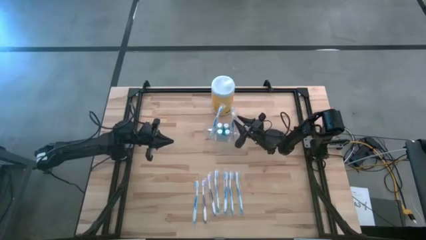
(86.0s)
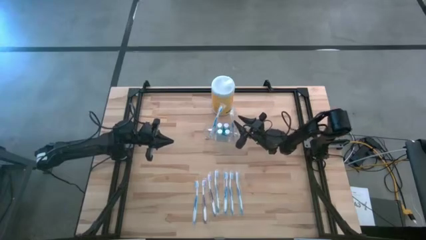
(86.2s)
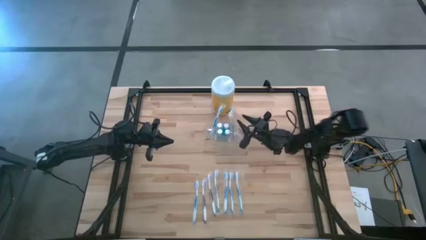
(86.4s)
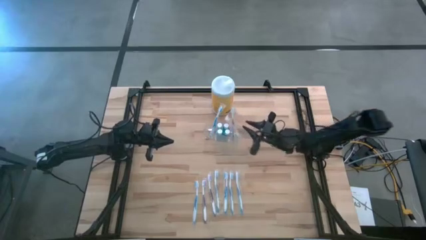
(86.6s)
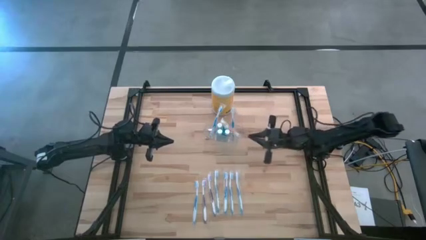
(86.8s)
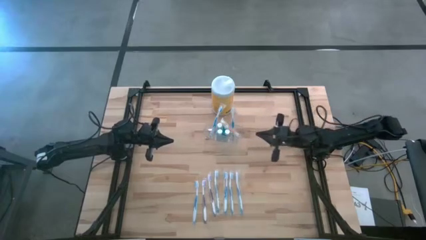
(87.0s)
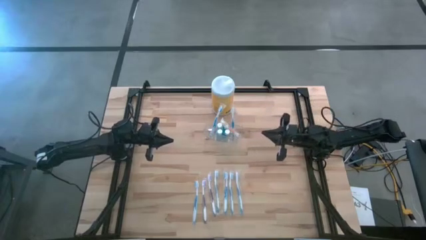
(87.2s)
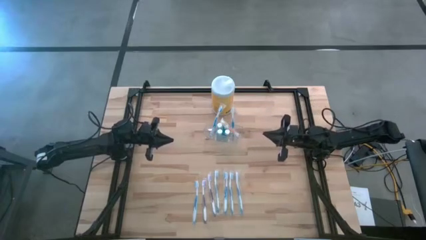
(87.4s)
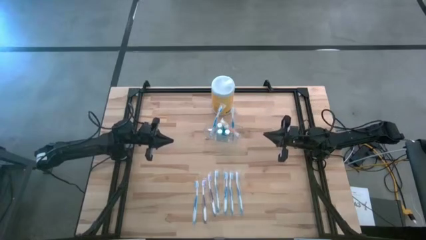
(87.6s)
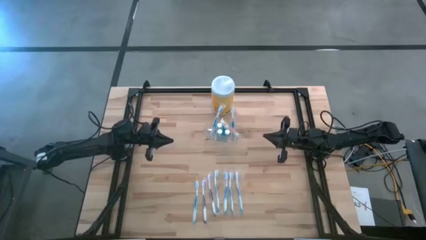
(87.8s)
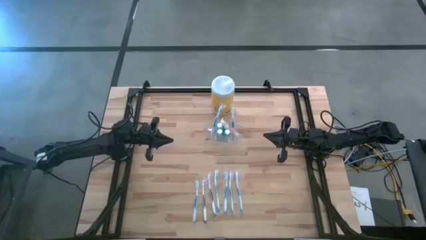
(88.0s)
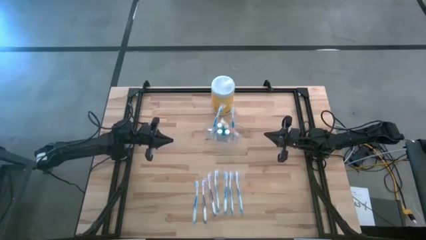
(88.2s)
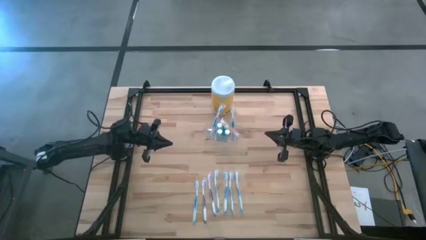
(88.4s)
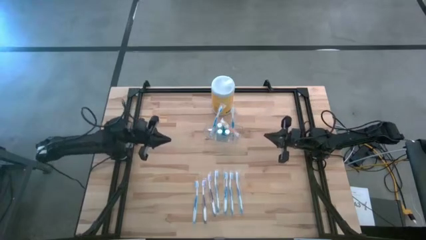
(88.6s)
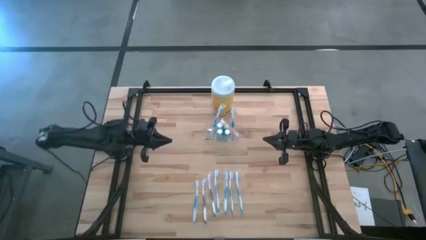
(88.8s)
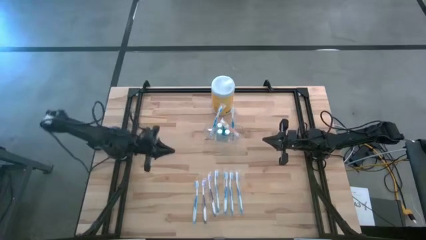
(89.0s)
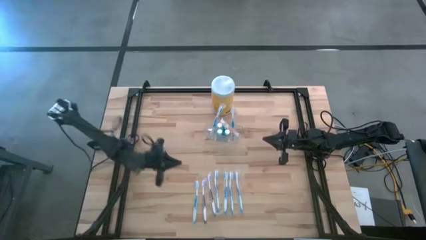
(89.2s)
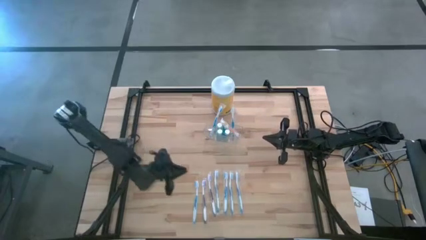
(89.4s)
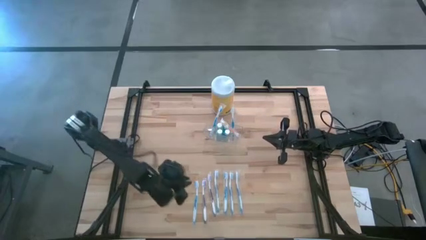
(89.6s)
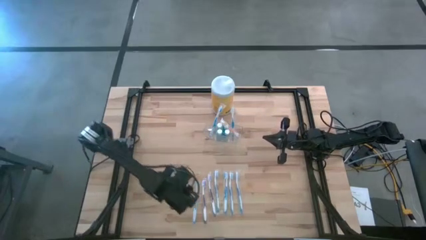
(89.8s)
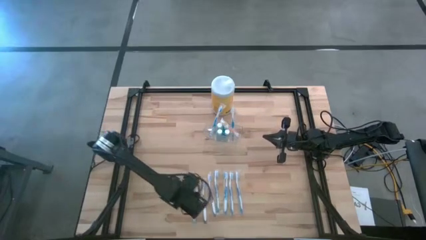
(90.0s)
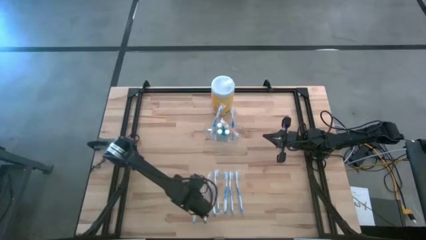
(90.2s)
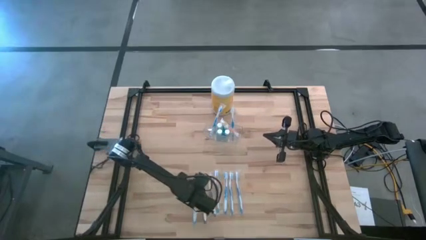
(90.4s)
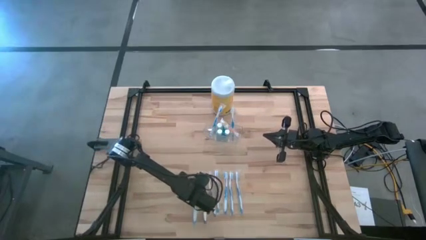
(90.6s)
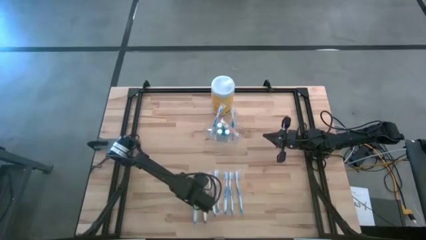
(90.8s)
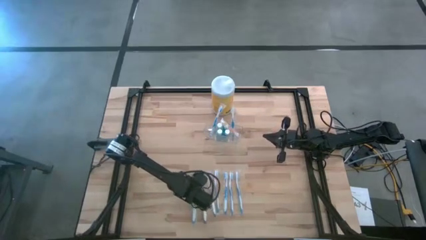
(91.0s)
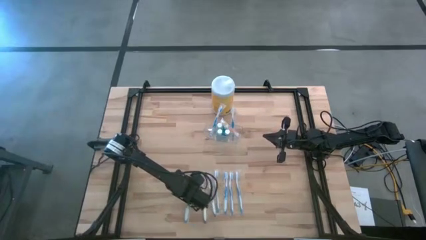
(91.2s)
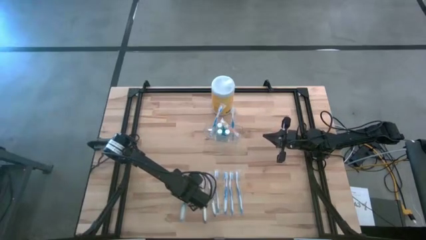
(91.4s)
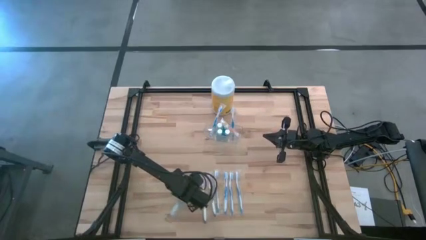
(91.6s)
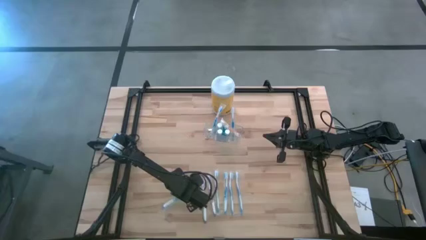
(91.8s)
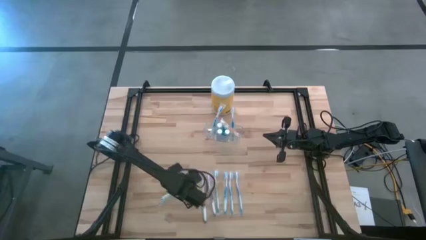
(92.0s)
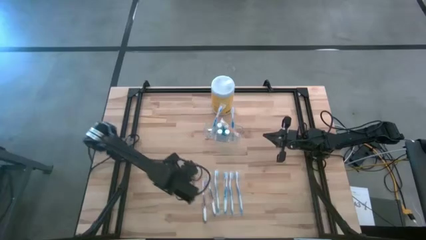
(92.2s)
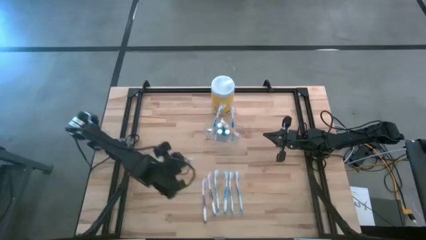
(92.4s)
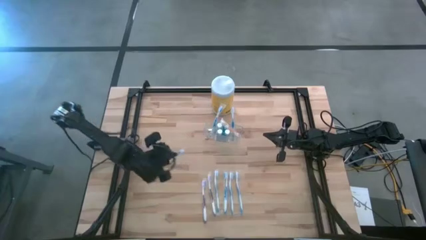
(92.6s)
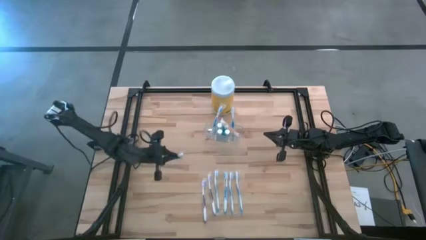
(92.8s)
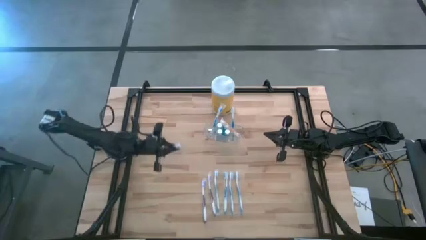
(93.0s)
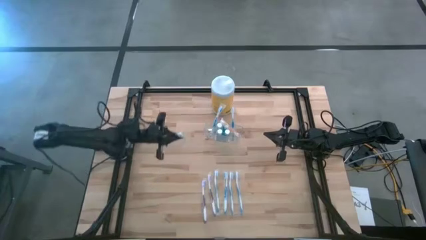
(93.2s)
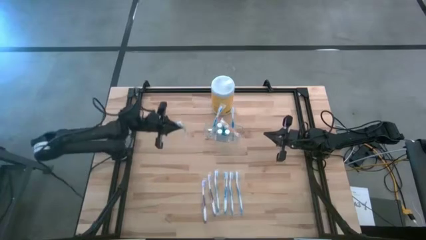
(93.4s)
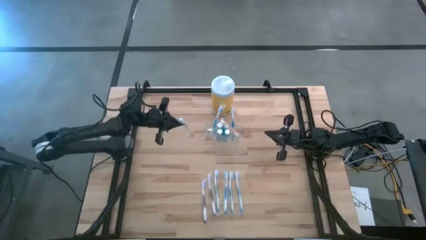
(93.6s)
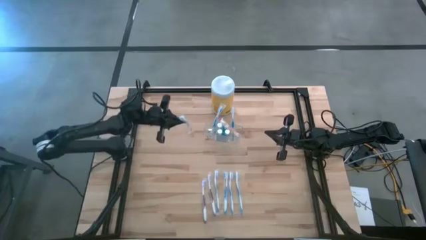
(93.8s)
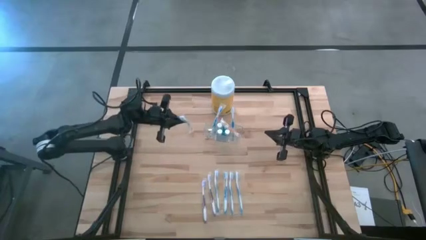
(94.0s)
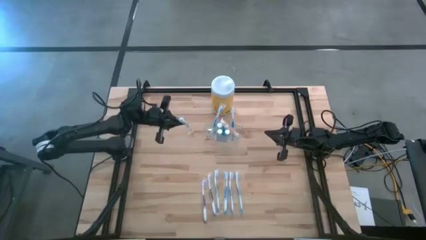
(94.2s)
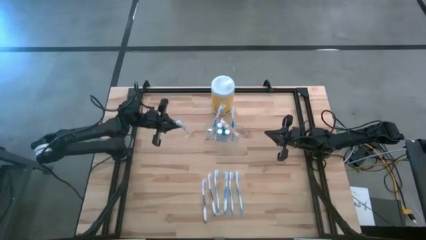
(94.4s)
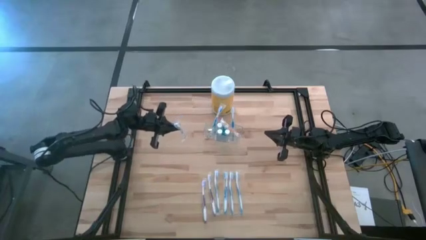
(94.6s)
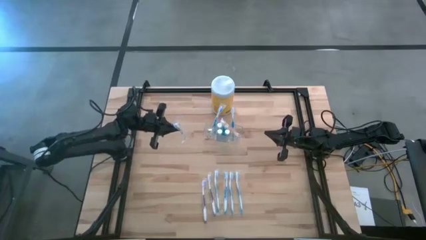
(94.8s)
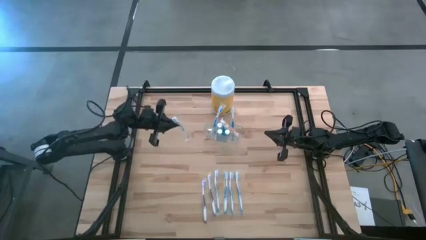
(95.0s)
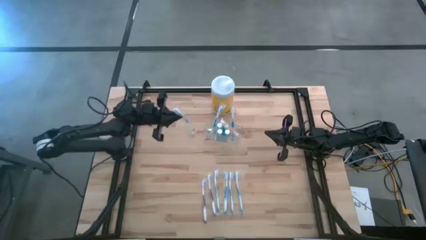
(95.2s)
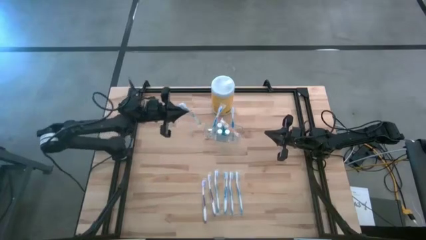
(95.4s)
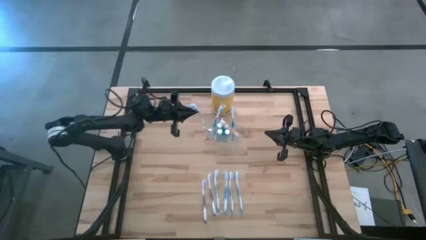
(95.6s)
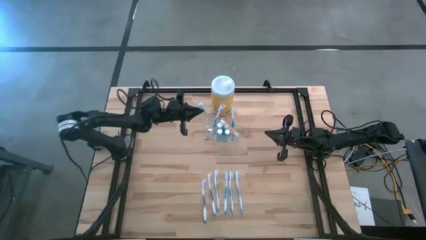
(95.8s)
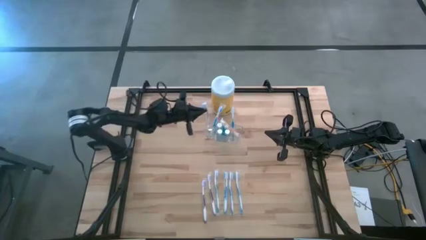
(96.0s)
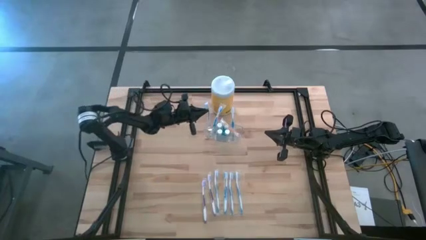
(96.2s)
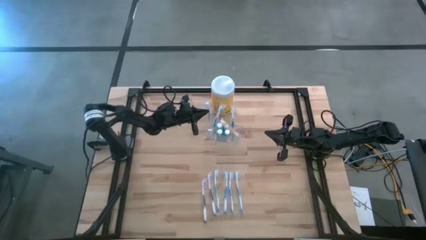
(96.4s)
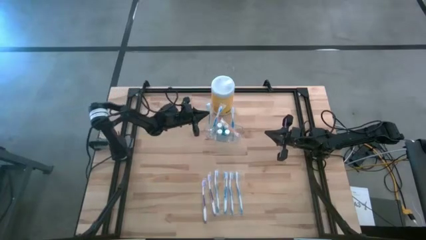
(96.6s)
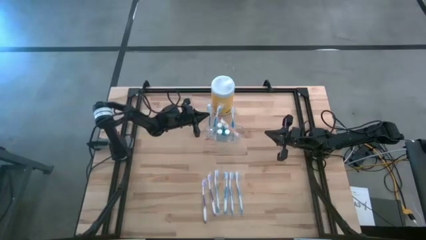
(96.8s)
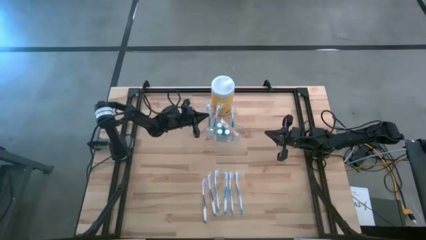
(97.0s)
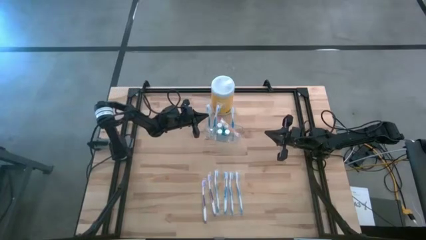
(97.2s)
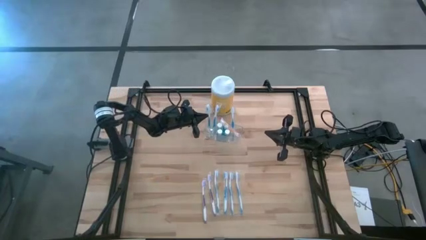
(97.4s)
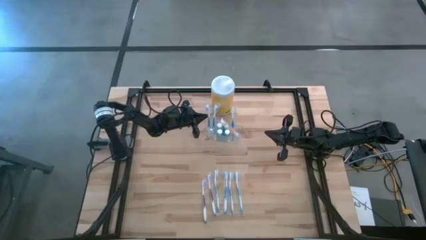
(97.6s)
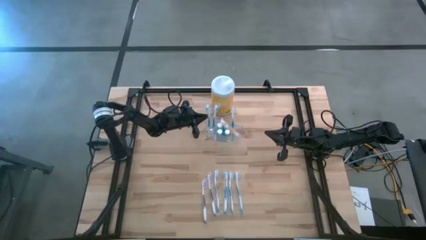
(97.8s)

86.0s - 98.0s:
Task: Pick & Place toothbrushing station
Put the blue toothbrush into the transparent organizer

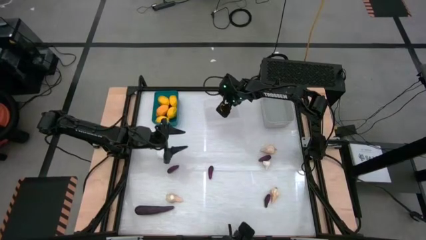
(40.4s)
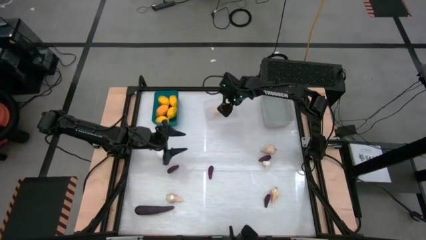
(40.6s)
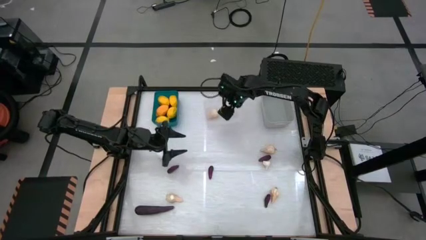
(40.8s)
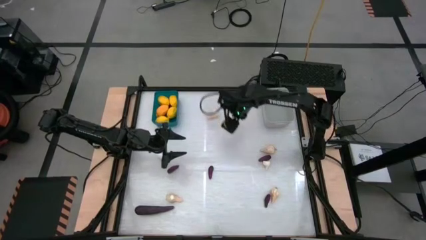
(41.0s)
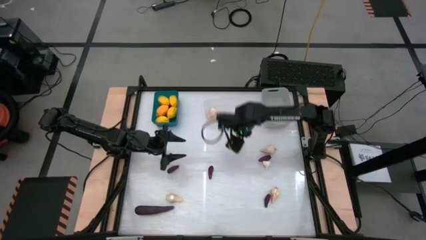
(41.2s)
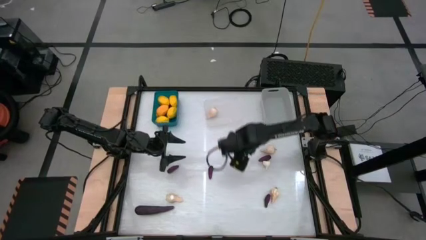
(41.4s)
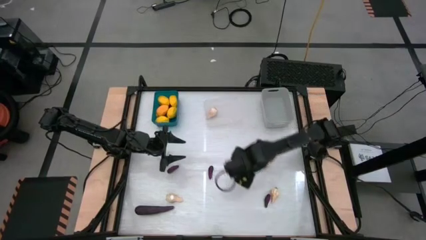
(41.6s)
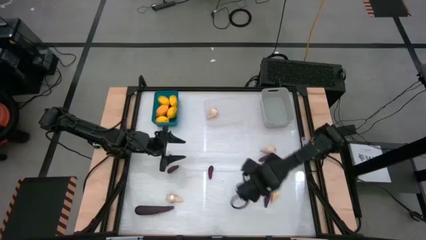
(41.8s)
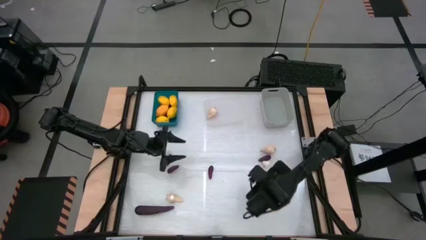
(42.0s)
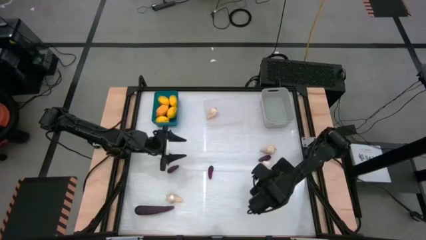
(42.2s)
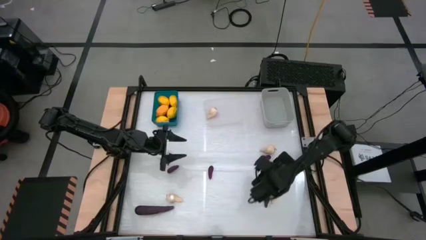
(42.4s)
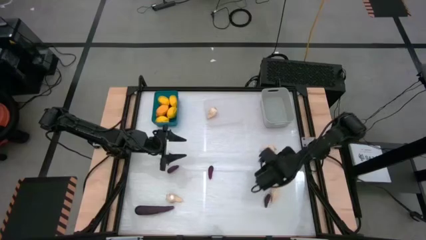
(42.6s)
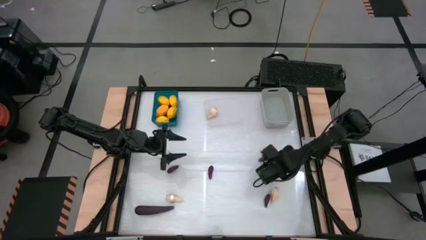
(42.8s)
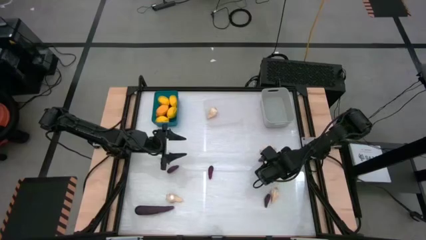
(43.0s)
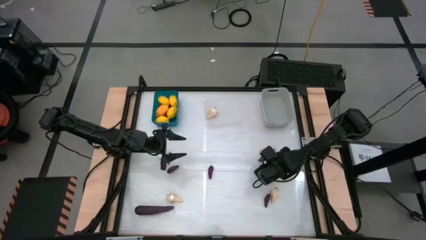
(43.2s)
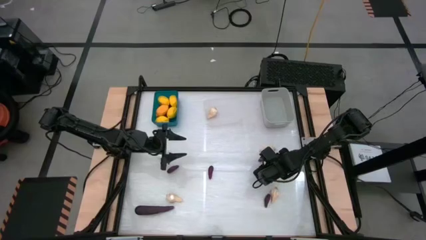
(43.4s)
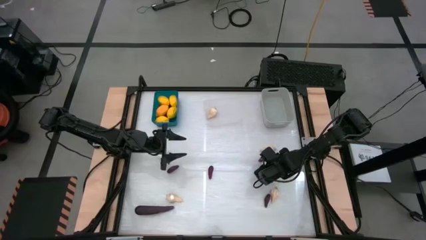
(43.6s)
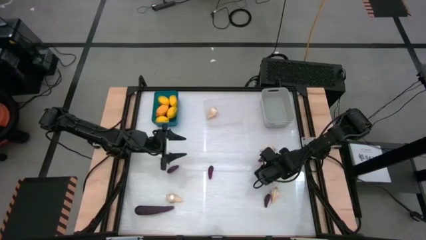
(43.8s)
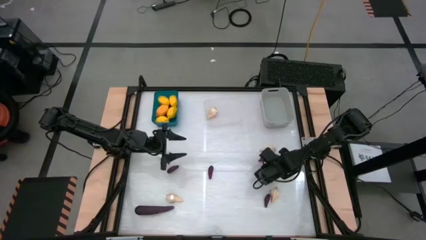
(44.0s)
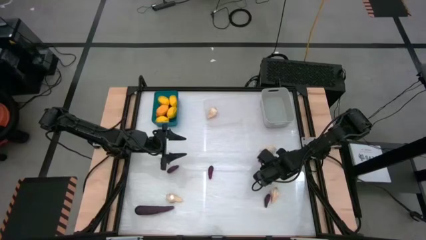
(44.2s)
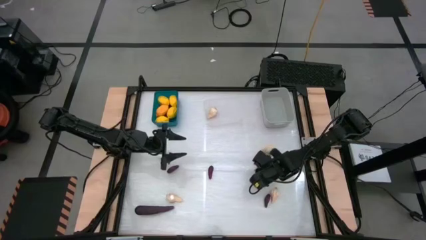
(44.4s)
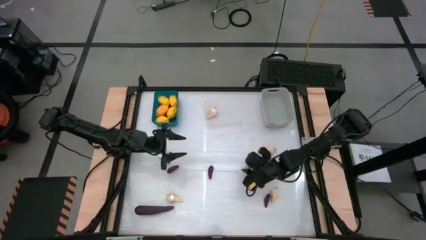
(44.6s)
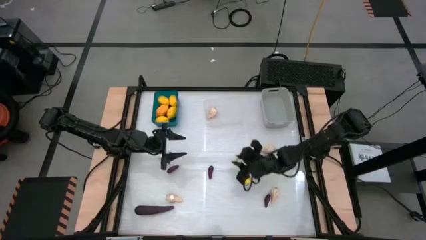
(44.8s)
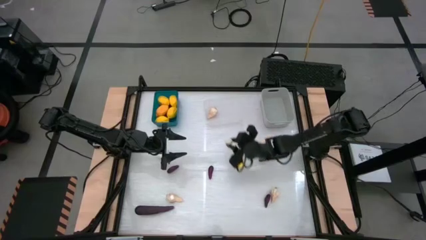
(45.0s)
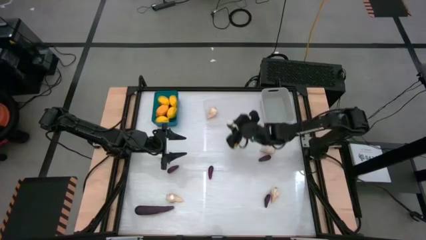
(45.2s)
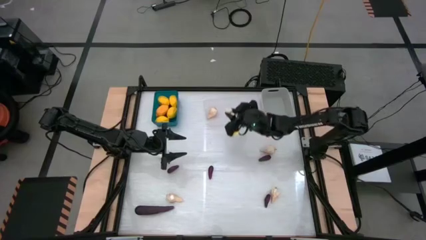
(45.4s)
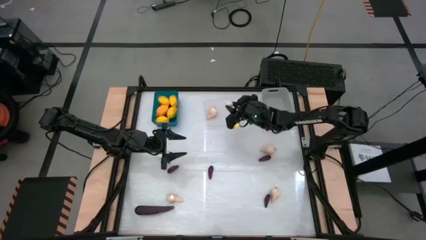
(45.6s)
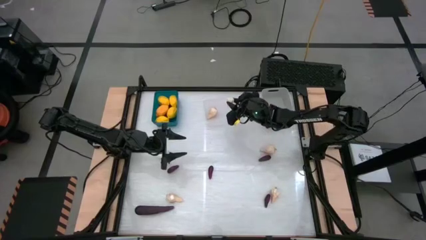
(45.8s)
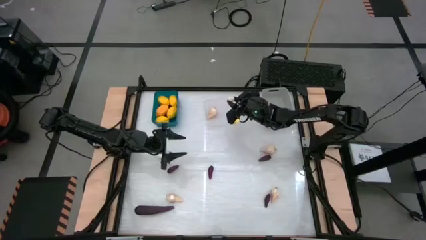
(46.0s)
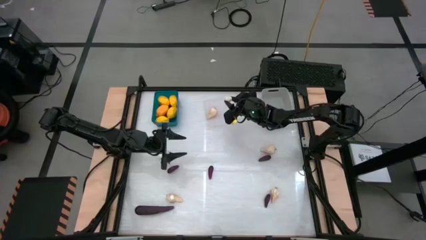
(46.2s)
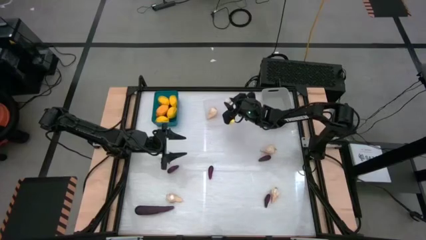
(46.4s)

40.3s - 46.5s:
Task: Sort produce into baskets
Put the garlic into the transparent bin
